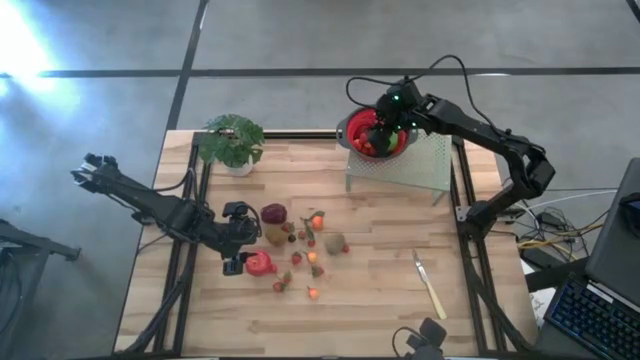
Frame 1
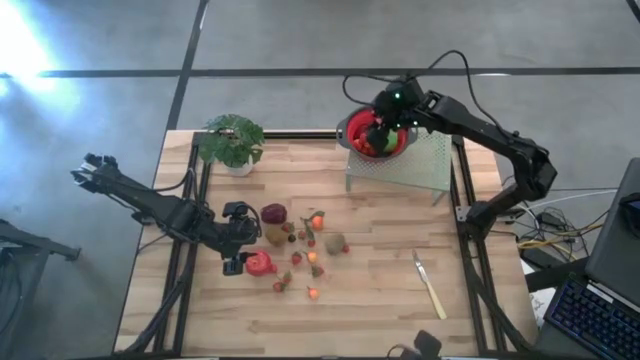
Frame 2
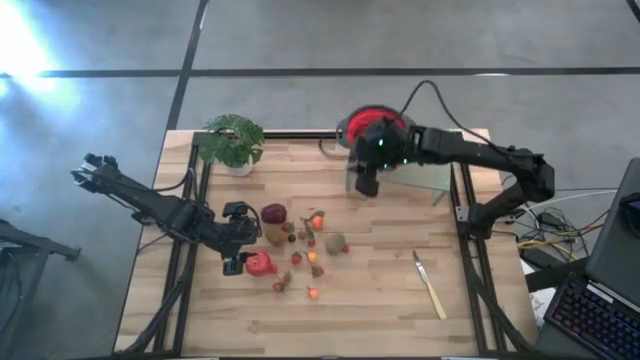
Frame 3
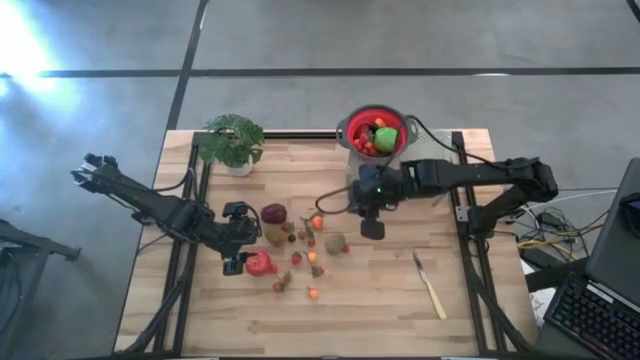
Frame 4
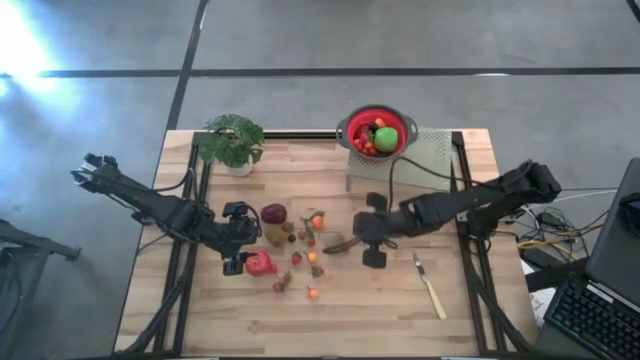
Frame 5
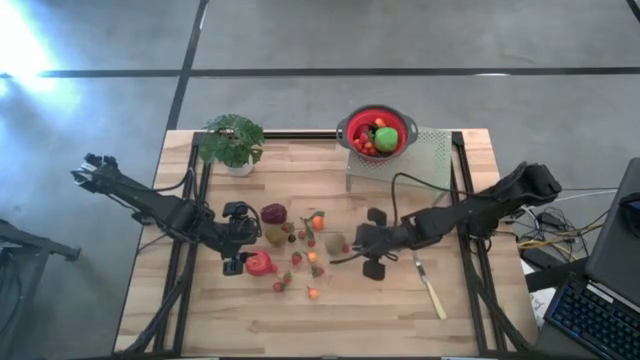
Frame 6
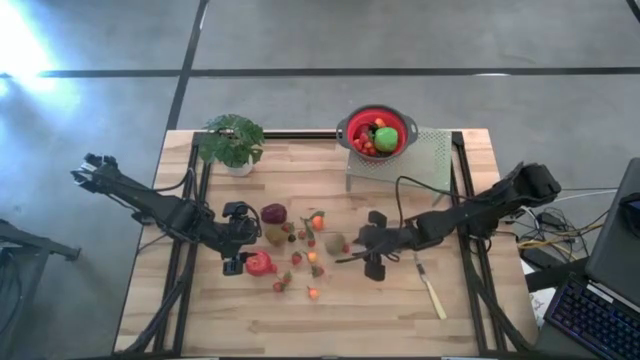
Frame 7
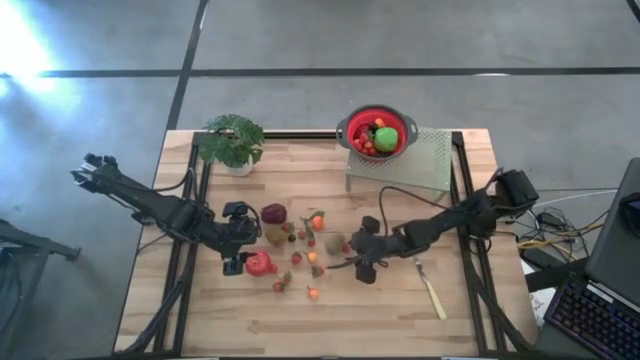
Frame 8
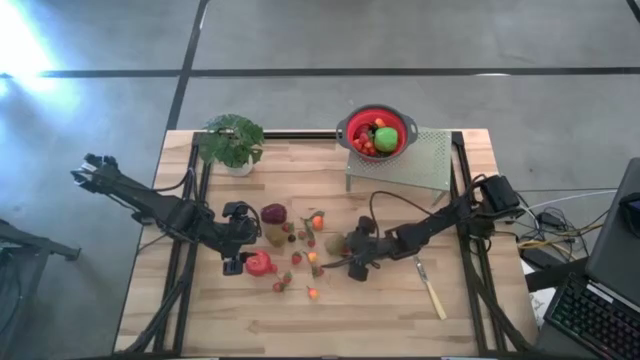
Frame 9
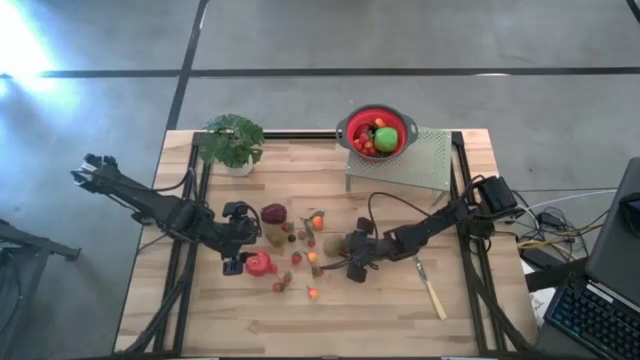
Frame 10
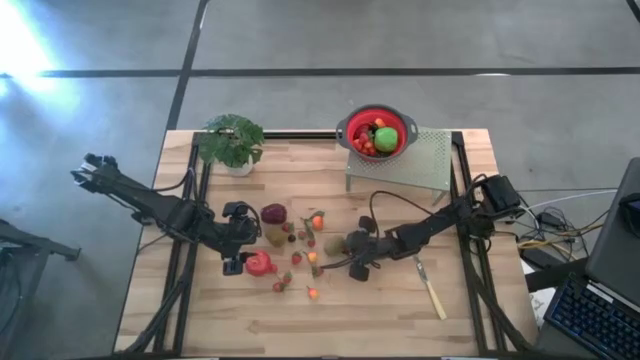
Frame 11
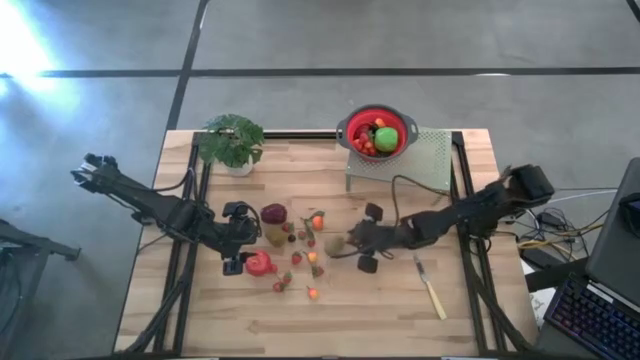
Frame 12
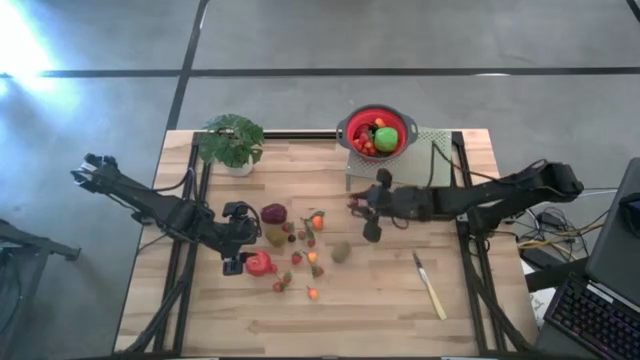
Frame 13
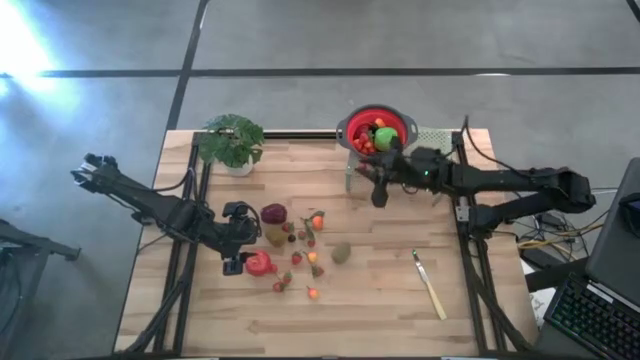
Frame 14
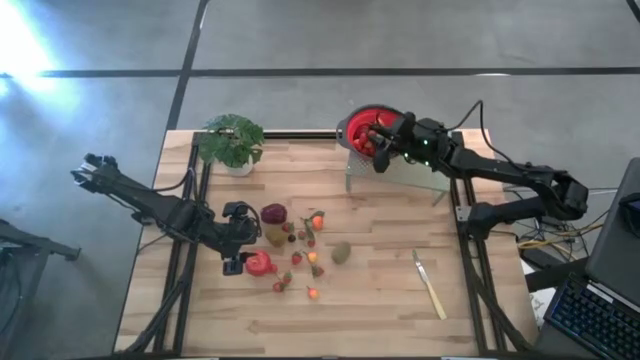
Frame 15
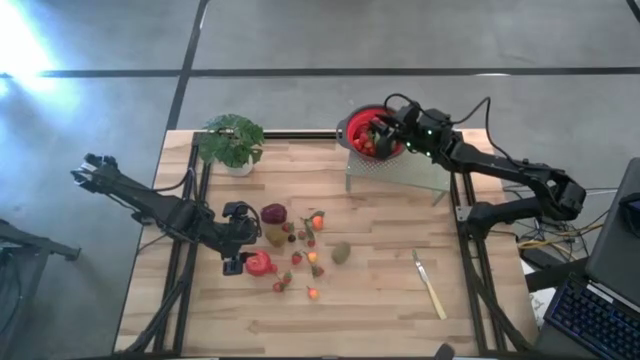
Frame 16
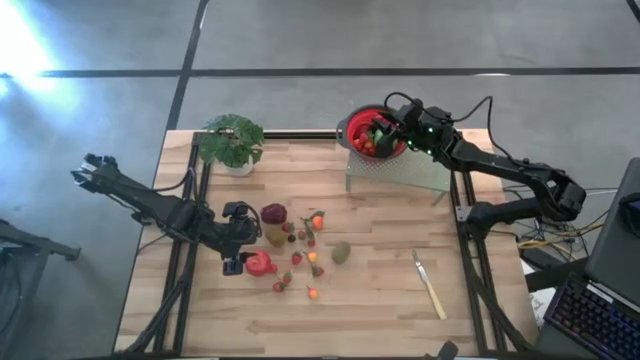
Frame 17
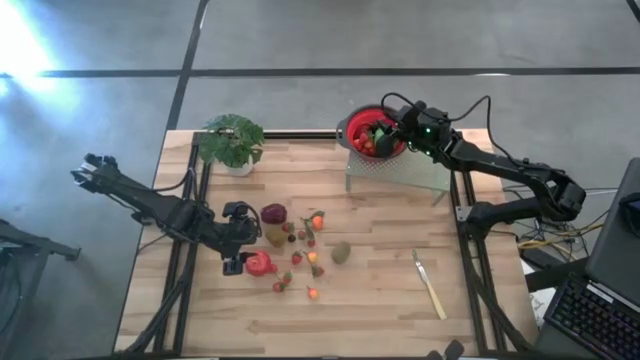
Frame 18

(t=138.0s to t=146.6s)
Task: Pick & Place Fruit
Put the strawberry into the strainer bowl on the shelf

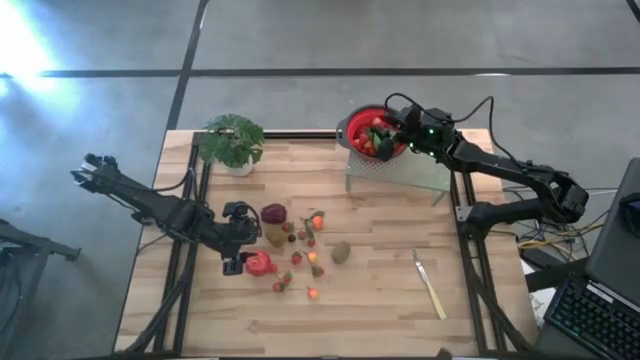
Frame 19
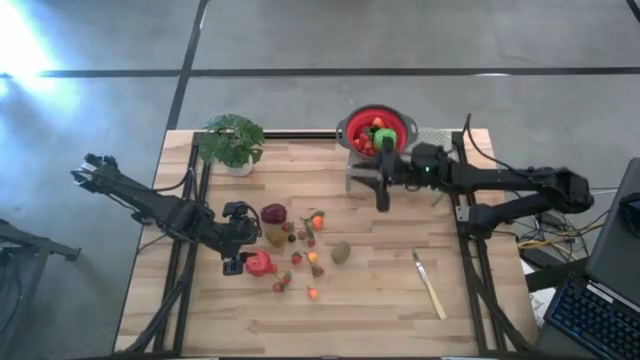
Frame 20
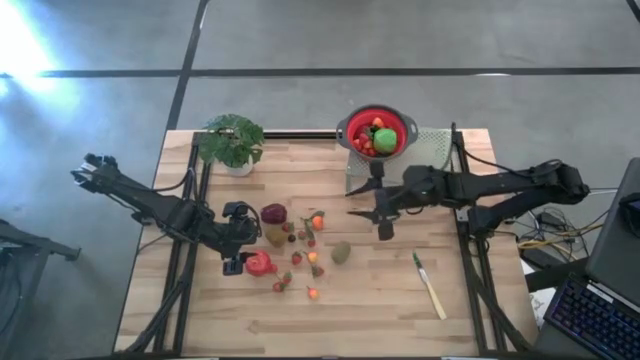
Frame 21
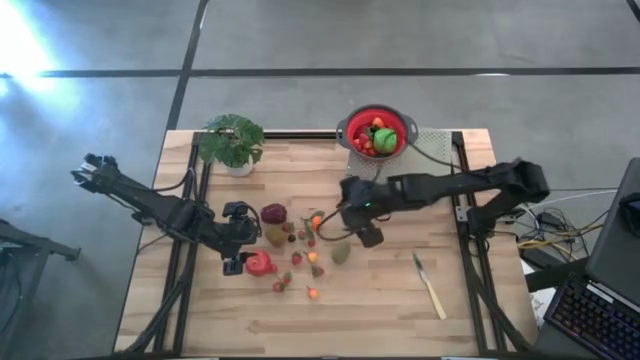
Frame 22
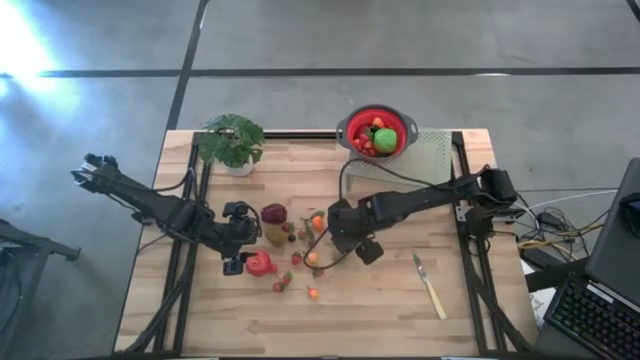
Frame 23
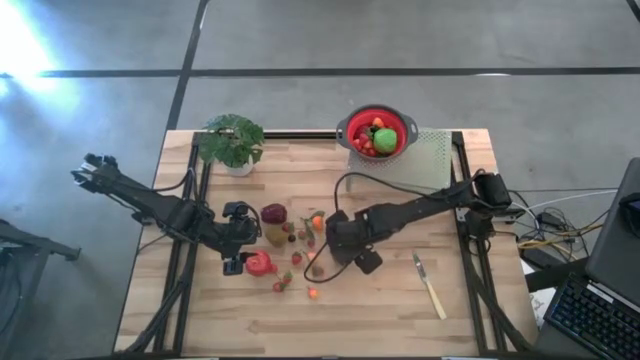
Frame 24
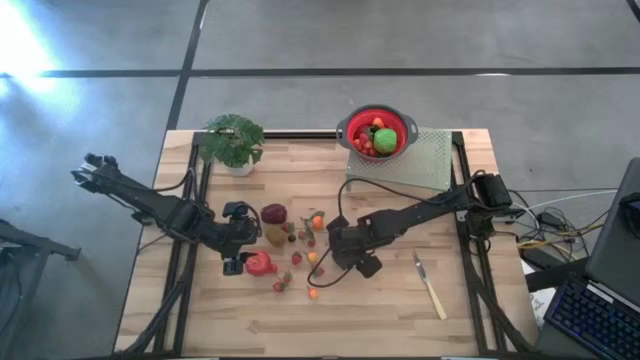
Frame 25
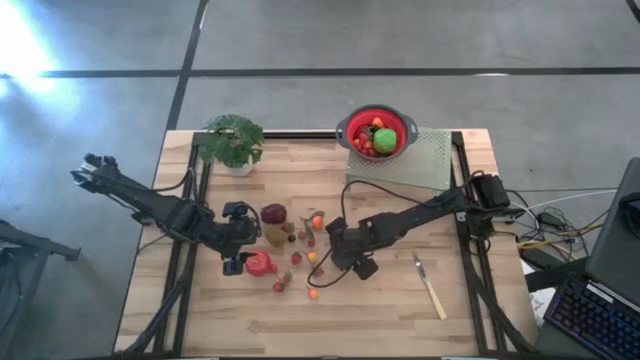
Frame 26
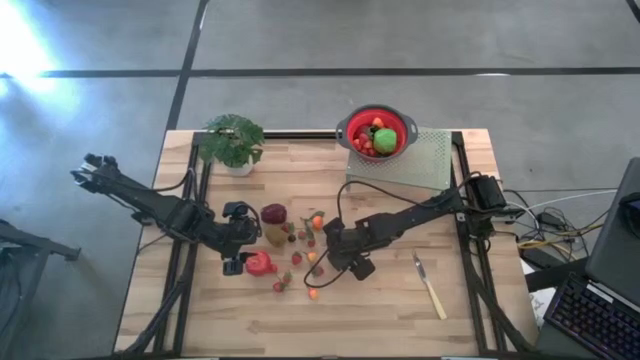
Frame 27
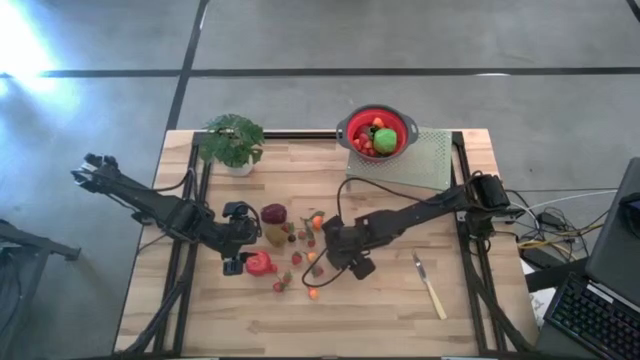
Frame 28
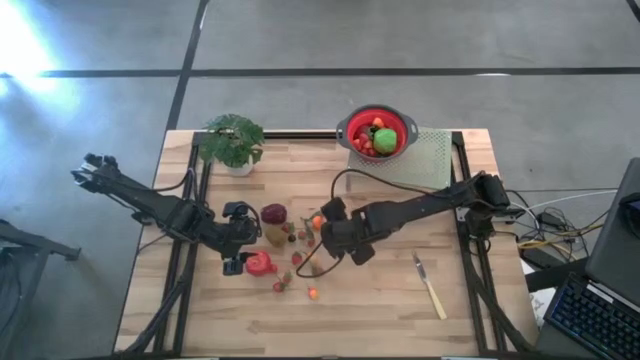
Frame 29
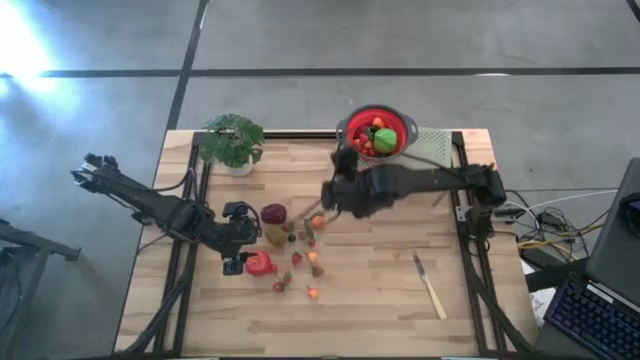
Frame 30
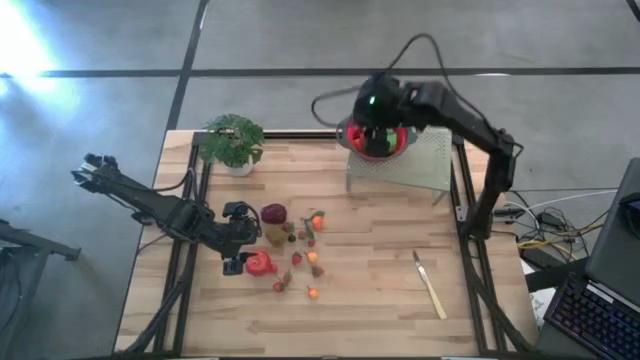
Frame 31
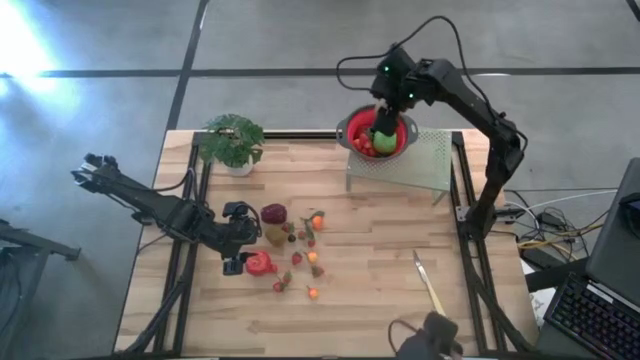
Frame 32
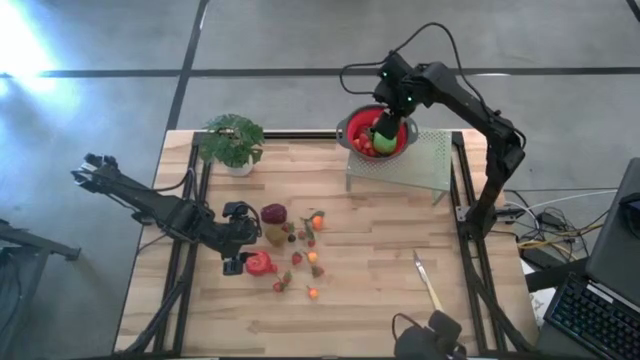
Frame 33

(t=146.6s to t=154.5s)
Put the kiwi into the strainer bowl on the shelf
